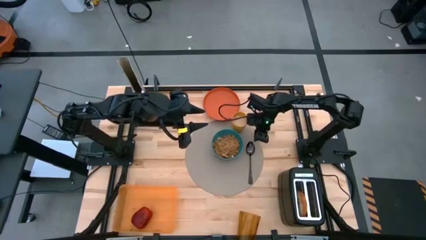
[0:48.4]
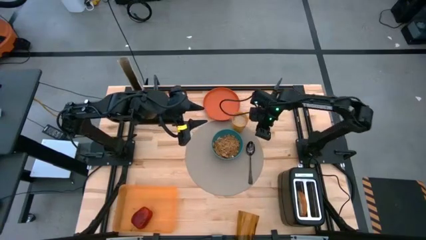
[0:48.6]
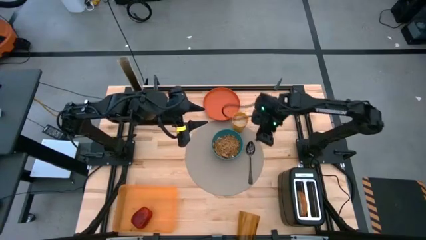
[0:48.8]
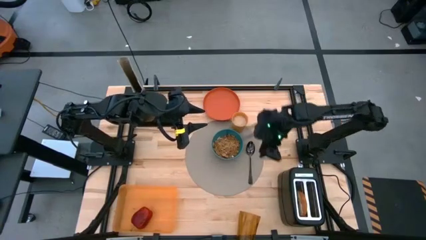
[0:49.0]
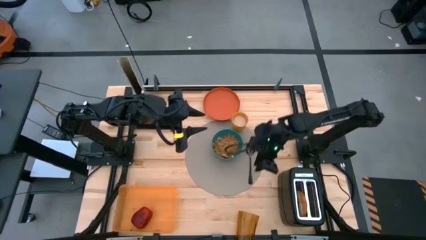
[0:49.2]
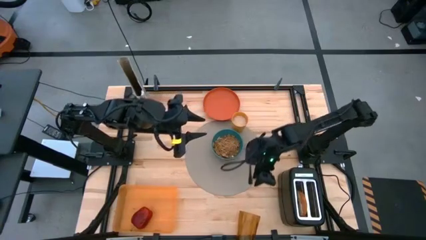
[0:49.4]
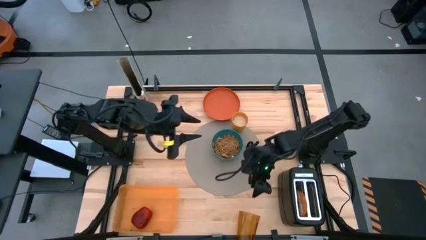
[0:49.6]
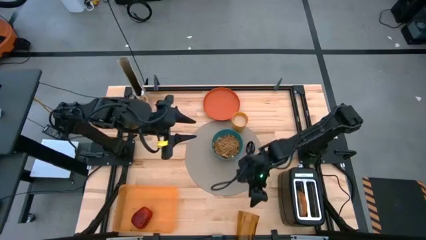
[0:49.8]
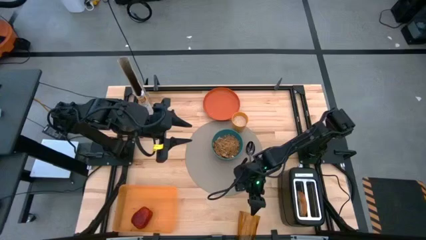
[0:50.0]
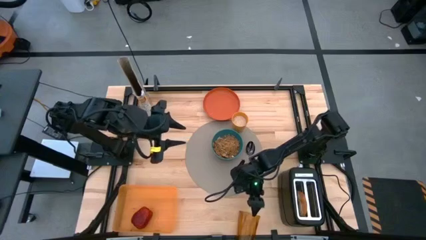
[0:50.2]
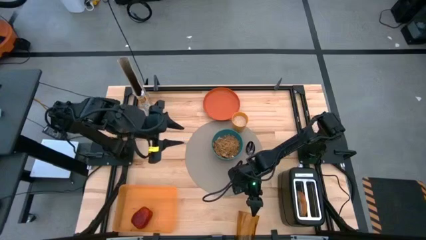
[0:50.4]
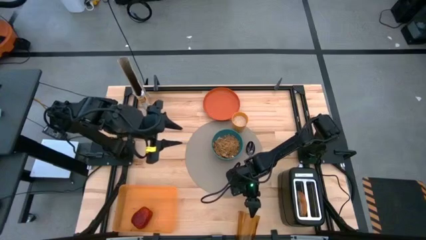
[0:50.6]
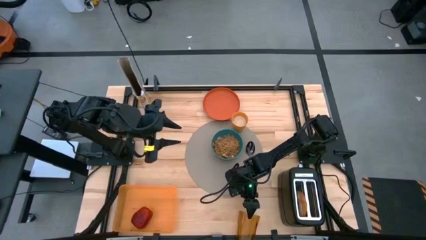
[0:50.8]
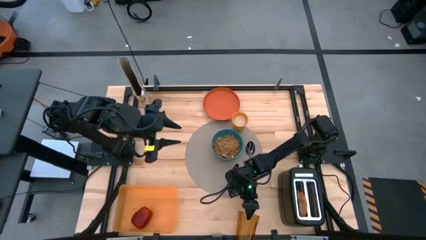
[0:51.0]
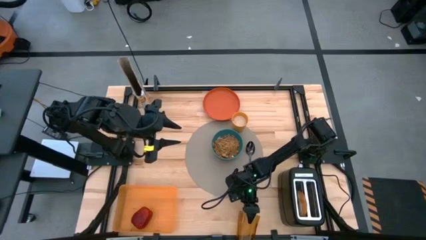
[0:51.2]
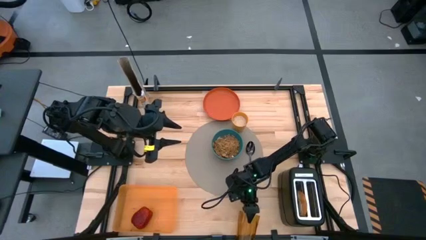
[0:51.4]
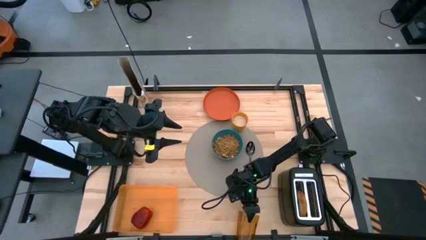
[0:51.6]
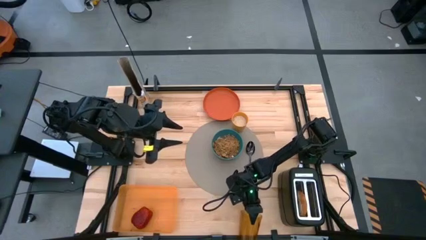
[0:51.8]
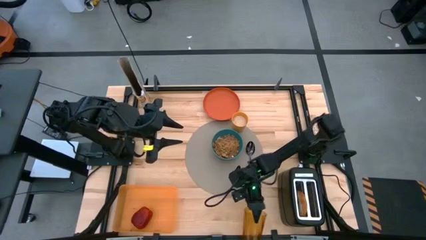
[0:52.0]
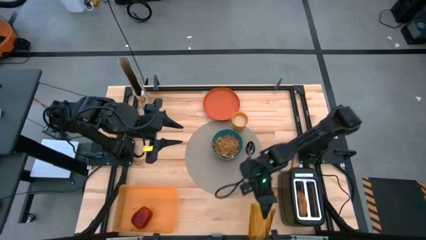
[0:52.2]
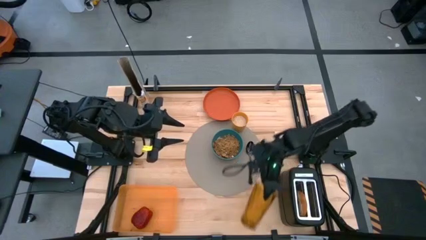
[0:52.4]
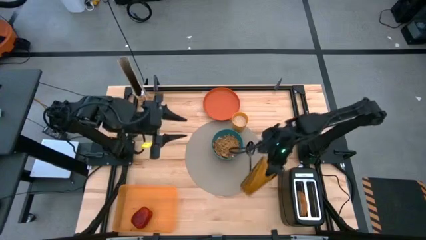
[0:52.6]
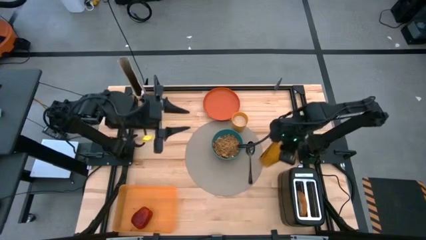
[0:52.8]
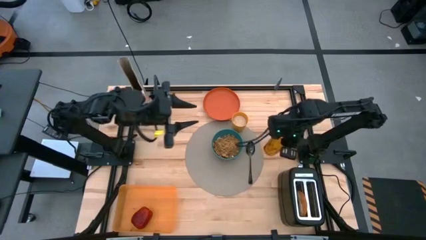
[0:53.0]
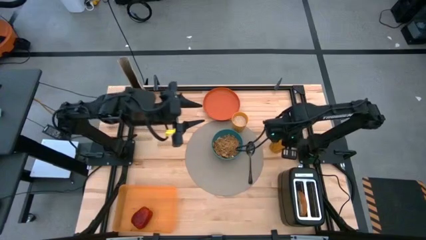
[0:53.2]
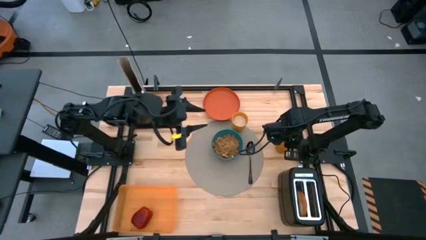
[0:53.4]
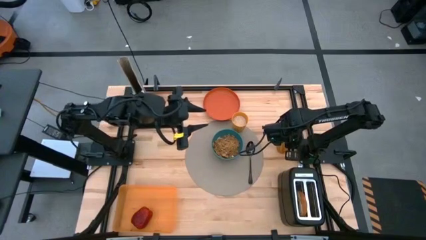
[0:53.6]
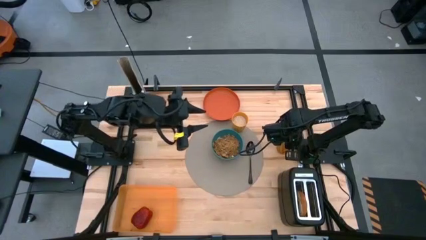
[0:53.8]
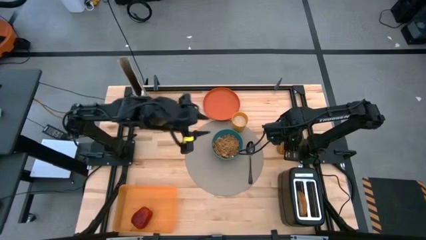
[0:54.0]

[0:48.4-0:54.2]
Task: Arrange a breakfast setting
Move the yellow cup to the middle right of the table

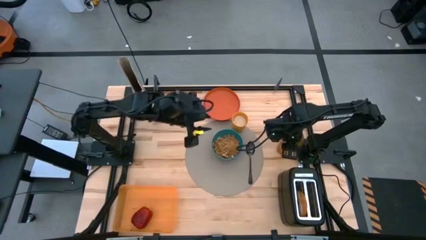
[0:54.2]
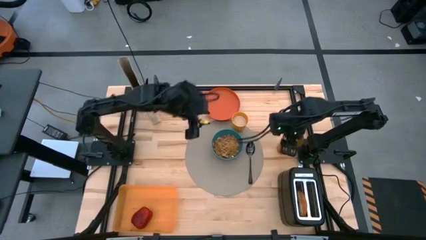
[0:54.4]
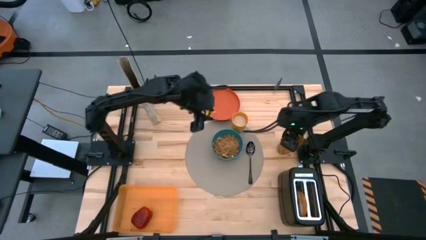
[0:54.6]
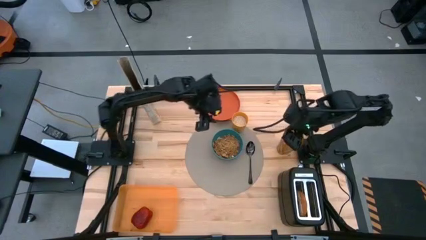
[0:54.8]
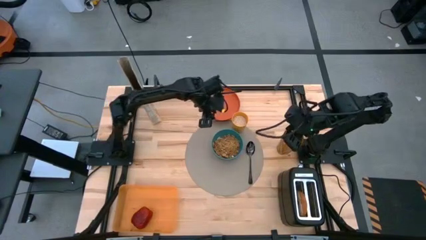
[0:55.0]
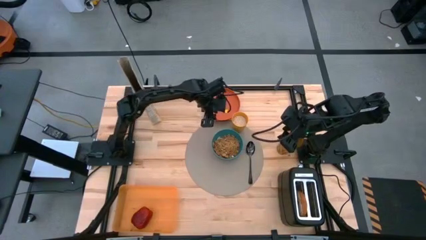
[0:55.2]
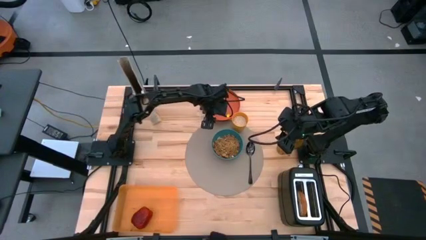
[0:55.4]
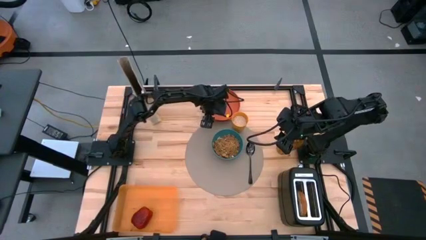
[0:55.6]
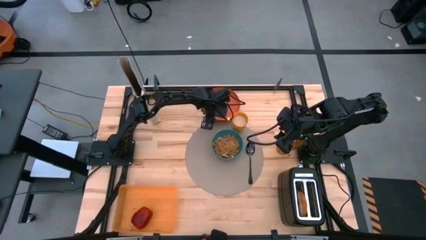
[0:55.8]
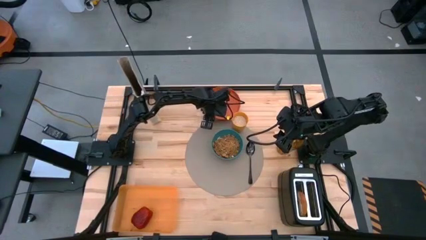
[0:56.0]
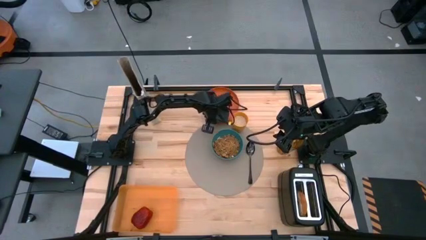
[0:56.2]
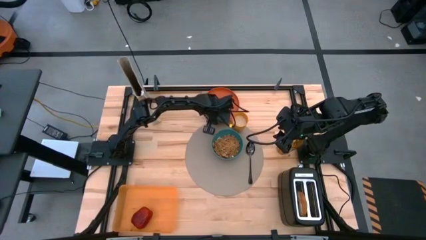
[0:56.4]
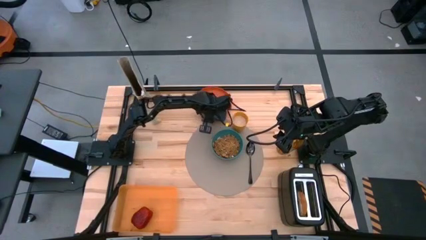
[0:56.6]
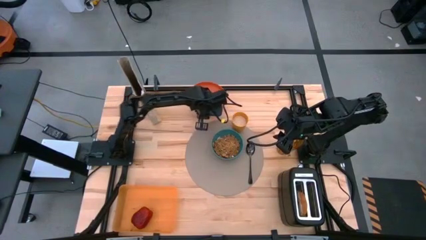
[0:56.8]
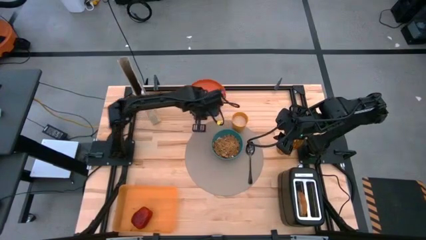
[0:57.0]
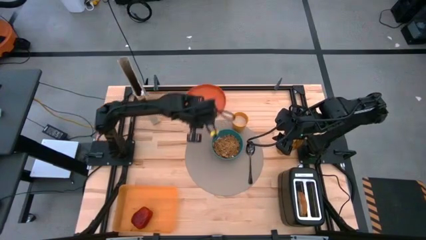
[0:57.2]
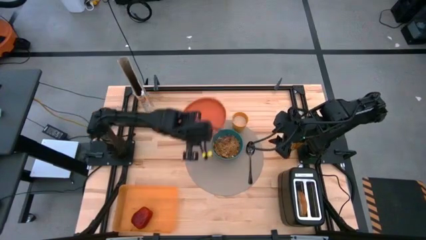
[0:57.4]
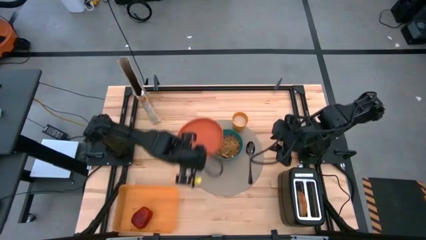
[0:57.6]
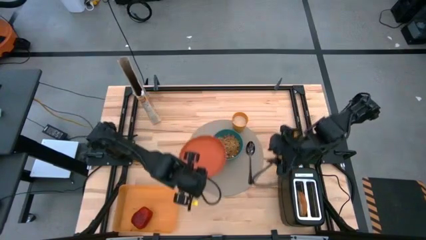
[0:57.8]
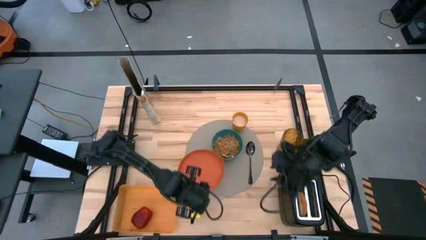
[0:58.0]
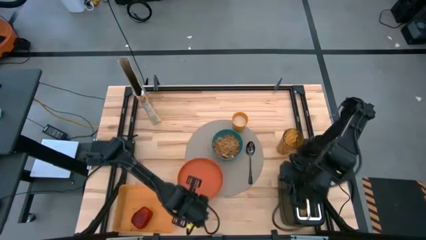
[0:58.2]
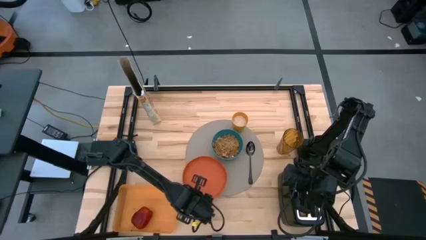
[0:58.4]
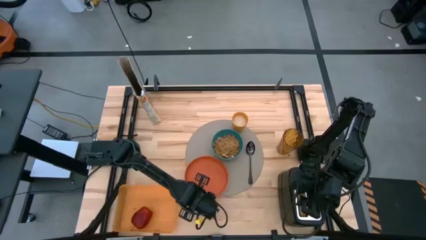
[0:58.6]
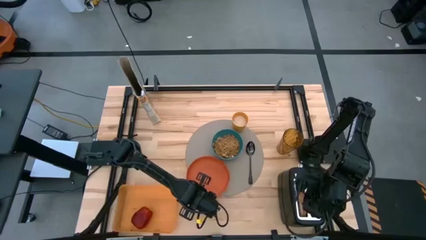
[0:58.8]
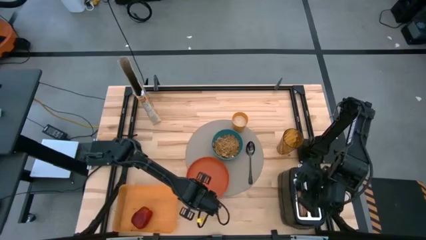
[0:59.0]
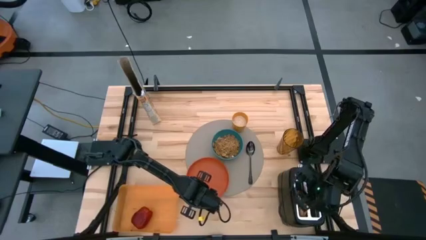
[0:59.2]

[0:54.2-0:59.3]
Put the orange plate on the gray mat to the bottom left of the green bowl

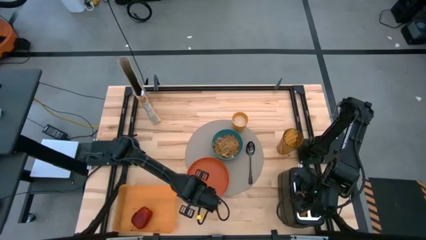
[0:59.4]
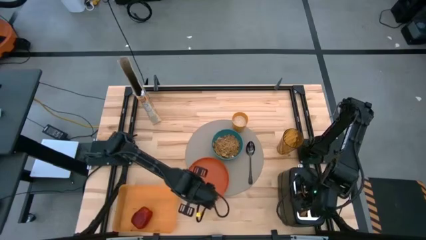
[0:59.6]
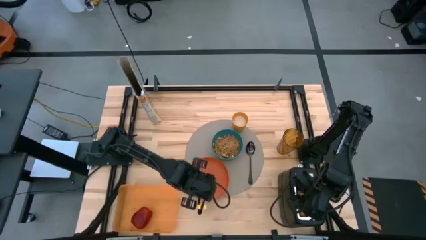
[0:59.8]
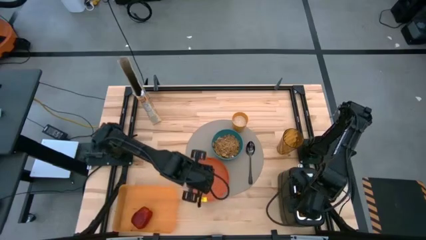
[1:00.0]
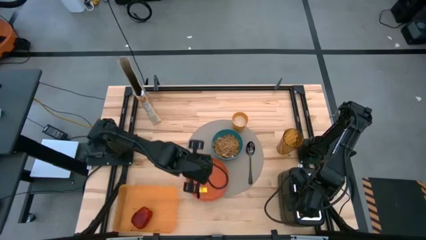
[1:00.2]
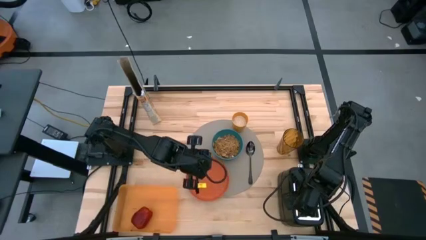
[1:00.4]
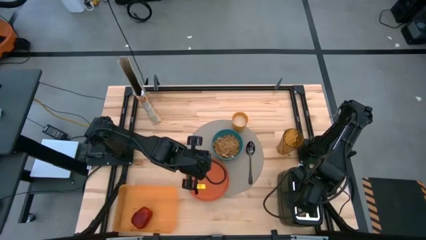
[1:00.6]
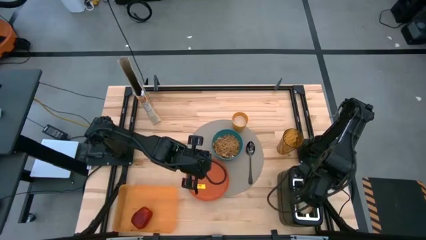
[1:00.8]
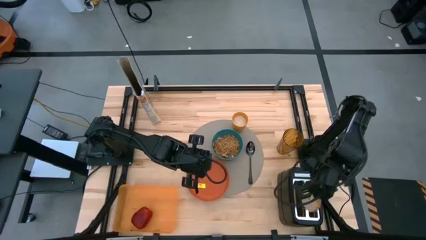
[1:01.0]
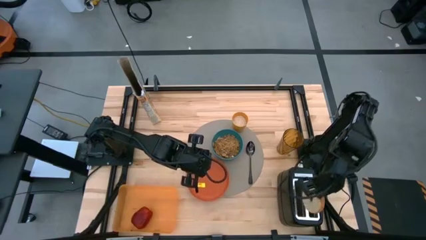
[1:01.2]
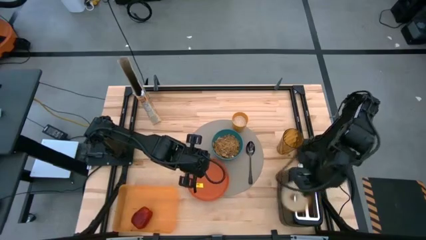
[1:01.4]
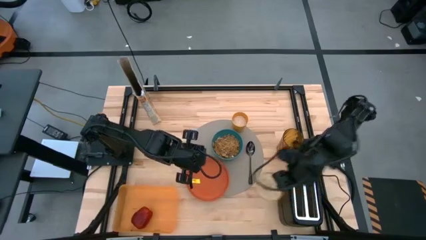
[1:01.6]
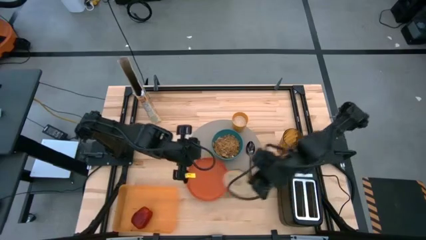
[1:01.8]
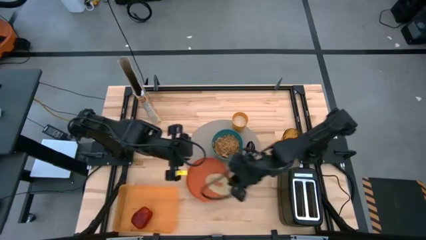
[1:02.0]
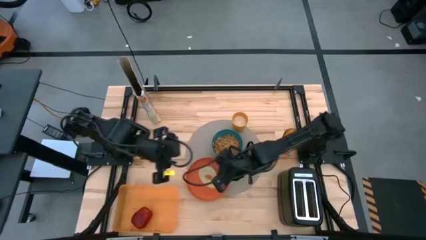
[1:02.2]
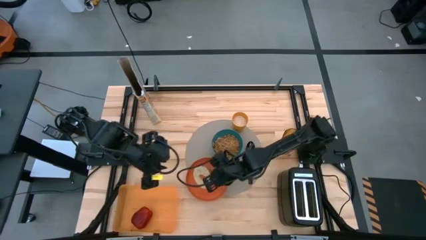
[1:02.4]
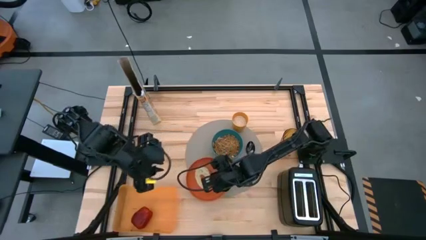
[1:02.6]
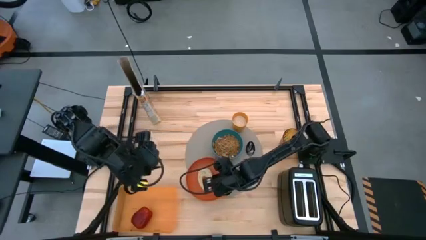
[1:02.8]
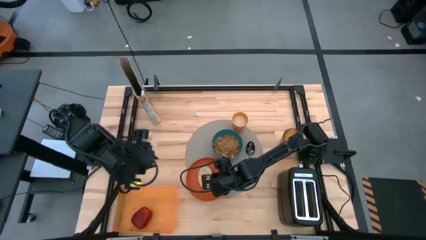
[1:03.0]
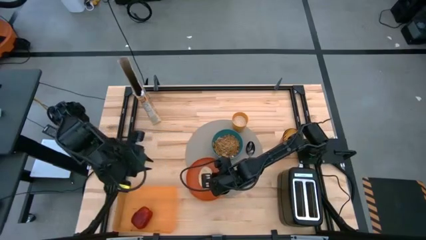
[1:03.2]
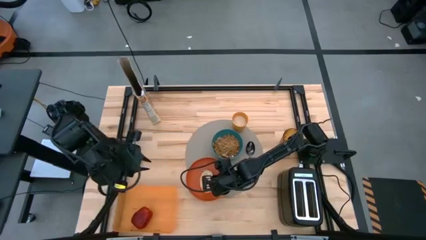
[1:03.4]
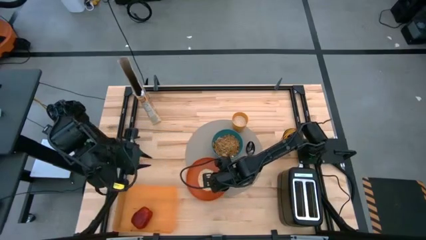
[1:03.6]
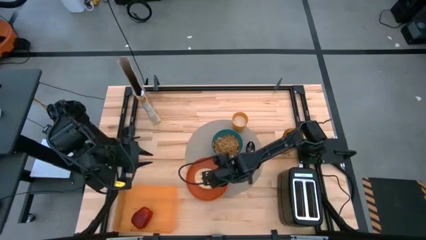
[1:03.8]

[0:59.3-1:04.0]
Put the bagel on the orange plate

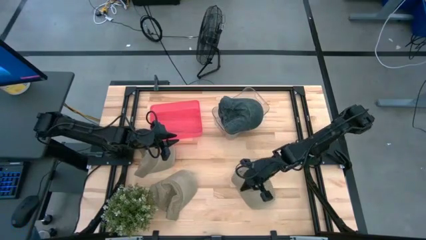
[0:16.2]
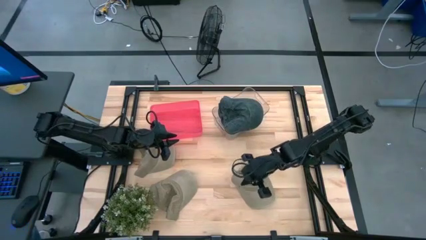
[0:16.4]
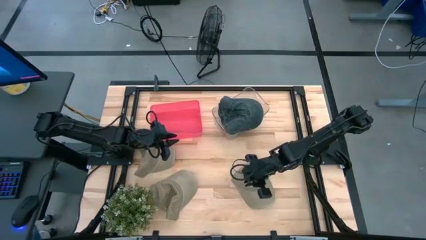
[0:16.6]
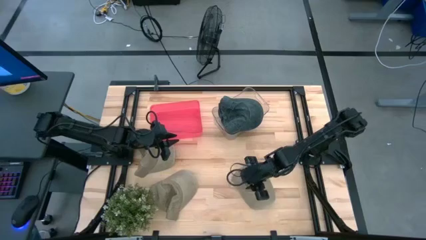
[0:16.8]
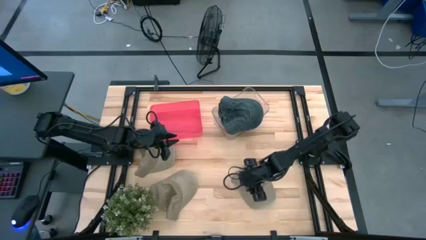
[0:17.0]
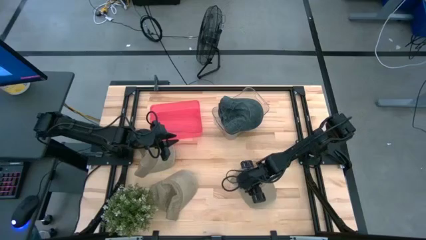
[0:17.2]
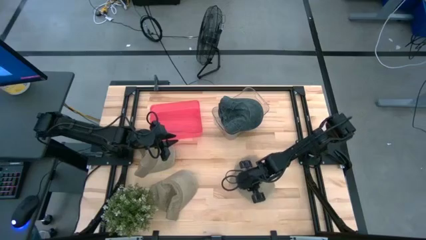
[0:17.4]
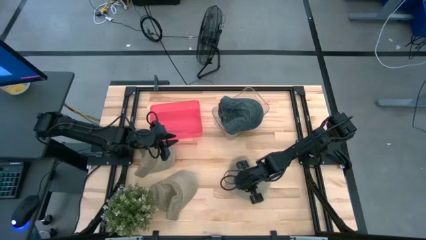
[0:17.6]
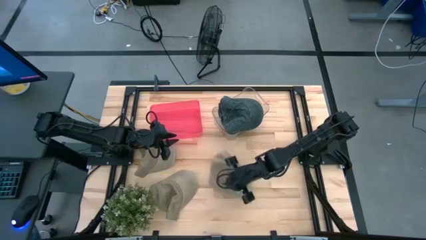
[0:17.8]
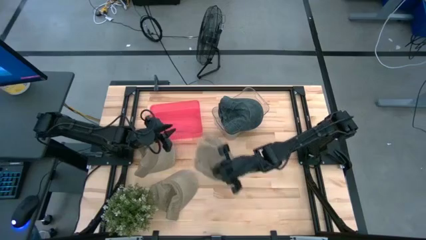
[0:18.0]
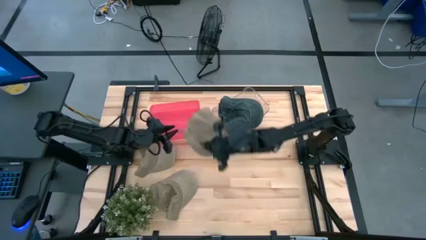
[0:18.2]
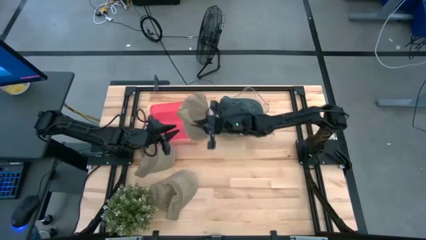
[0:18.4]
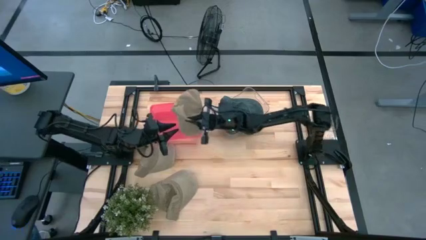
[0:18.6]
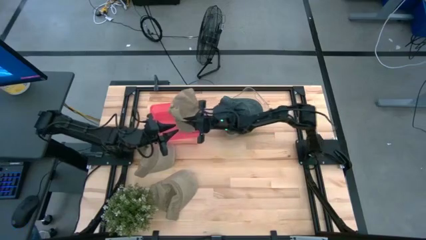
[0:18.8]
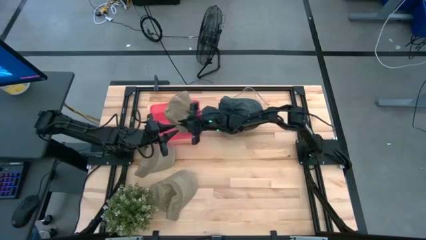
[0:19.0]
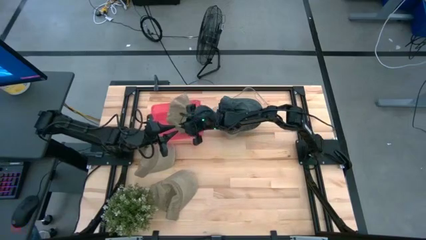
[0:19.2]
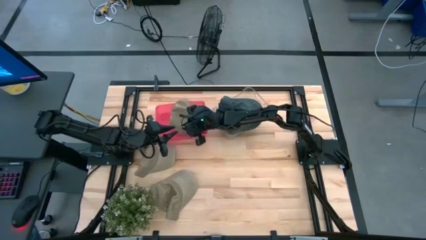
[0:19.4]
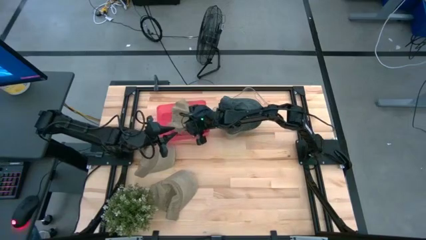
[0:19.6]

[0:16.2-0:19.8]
Task: Pick & Place hat
Put the bottom right brown cap into the red bin
